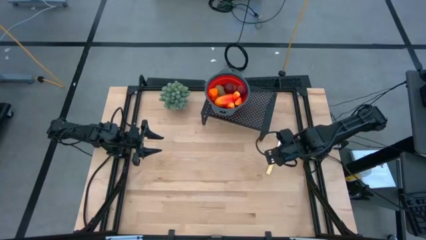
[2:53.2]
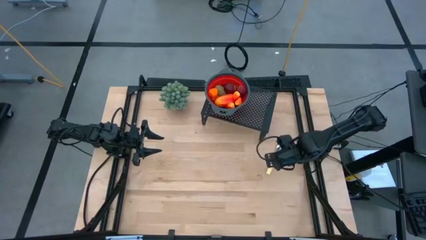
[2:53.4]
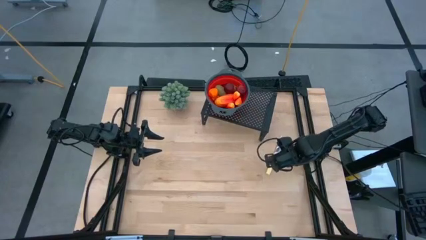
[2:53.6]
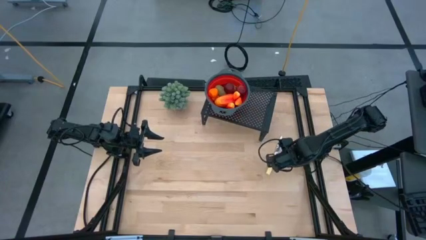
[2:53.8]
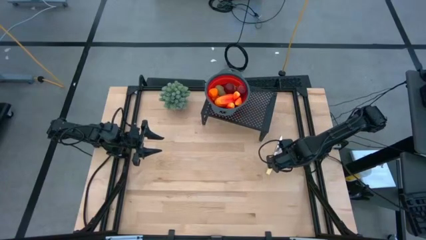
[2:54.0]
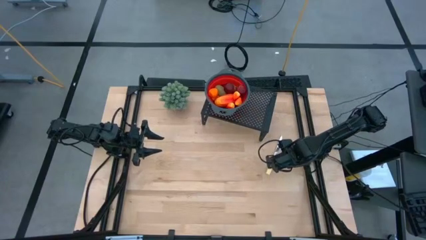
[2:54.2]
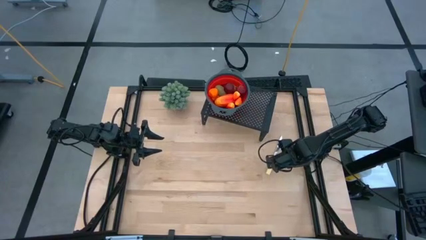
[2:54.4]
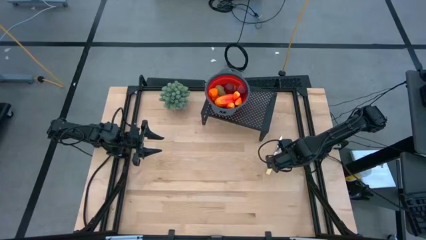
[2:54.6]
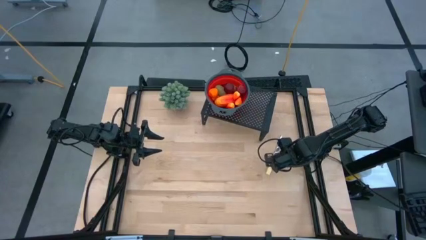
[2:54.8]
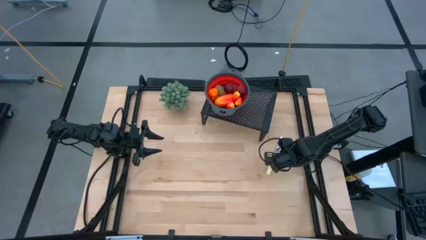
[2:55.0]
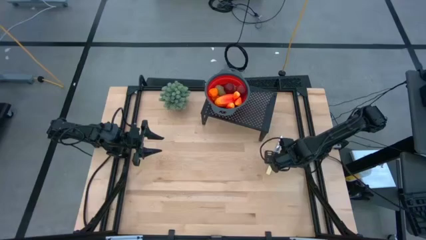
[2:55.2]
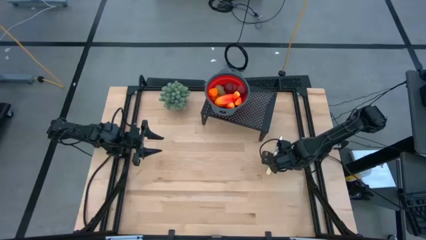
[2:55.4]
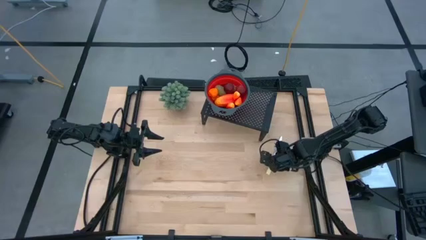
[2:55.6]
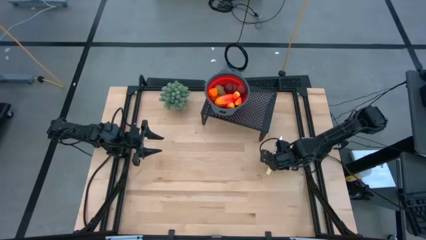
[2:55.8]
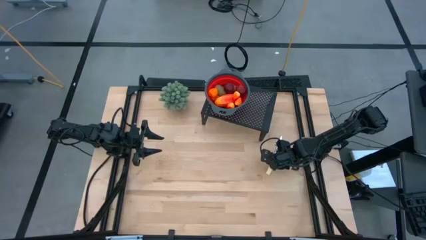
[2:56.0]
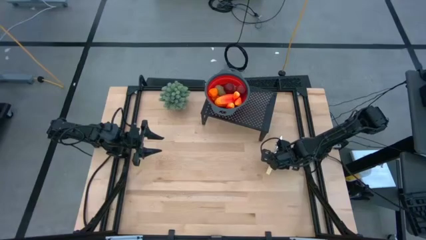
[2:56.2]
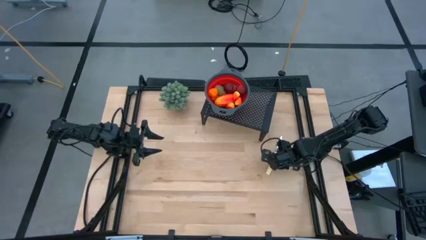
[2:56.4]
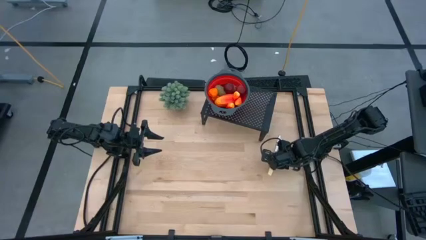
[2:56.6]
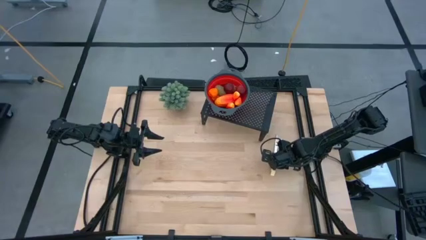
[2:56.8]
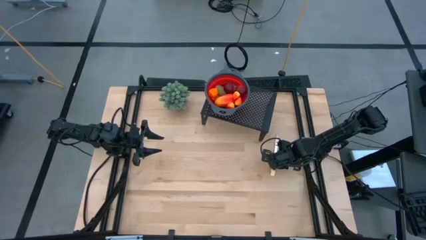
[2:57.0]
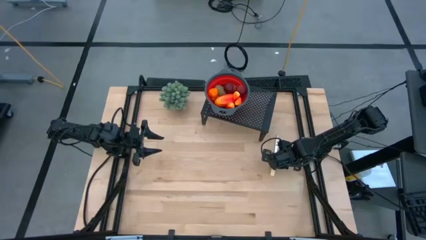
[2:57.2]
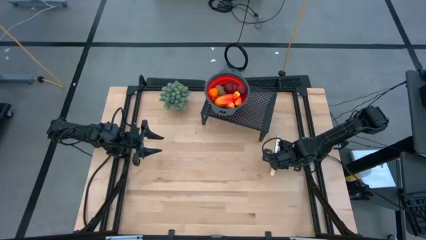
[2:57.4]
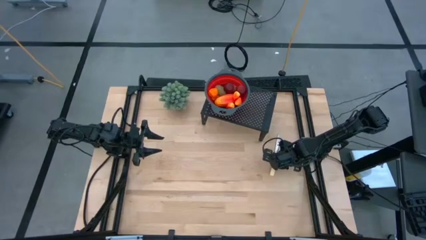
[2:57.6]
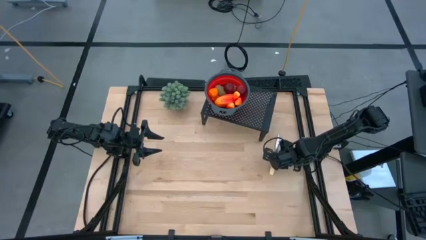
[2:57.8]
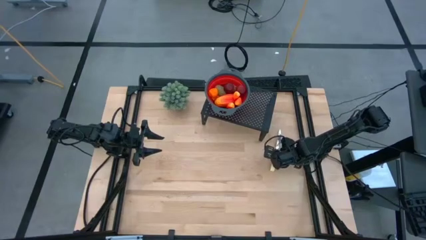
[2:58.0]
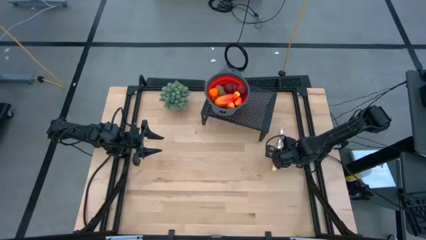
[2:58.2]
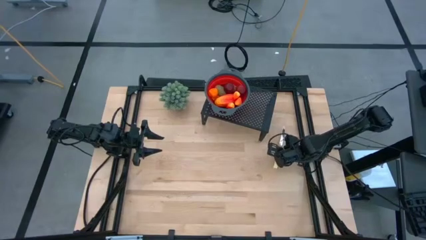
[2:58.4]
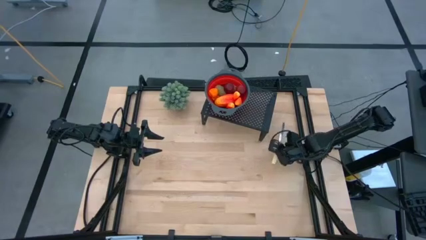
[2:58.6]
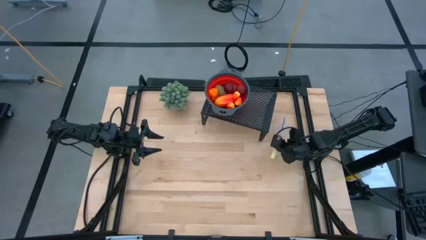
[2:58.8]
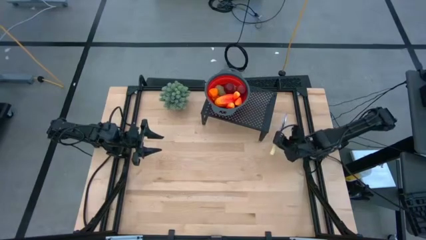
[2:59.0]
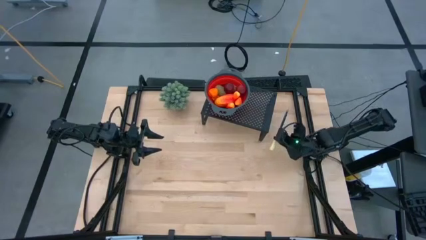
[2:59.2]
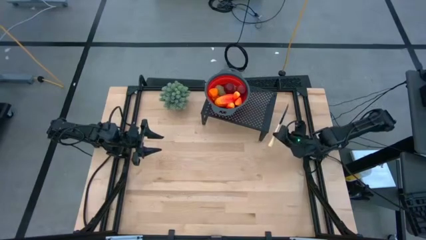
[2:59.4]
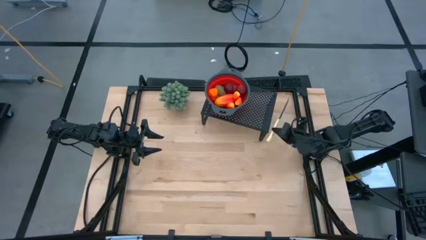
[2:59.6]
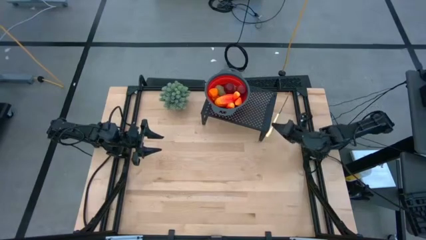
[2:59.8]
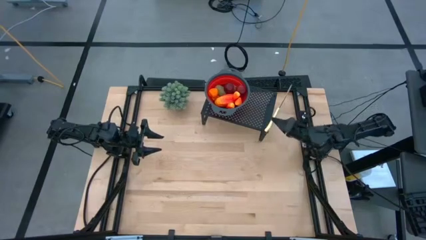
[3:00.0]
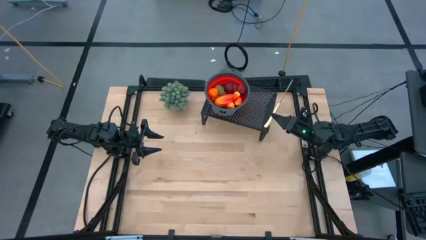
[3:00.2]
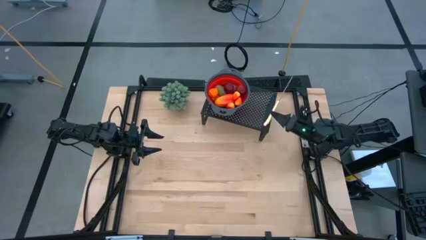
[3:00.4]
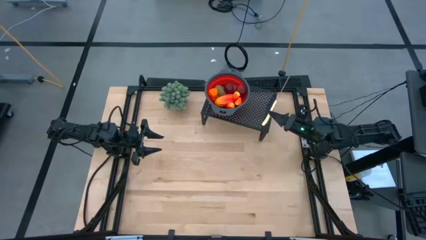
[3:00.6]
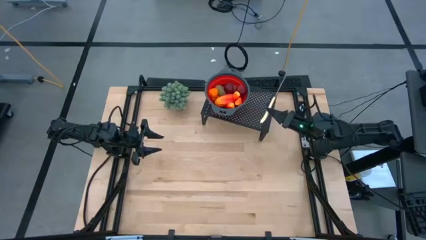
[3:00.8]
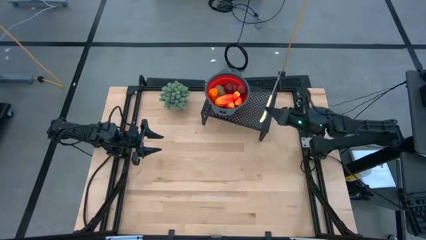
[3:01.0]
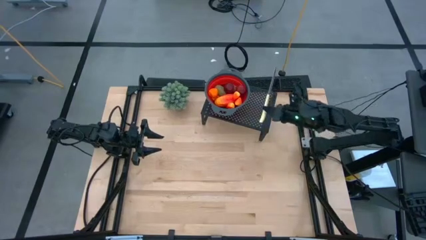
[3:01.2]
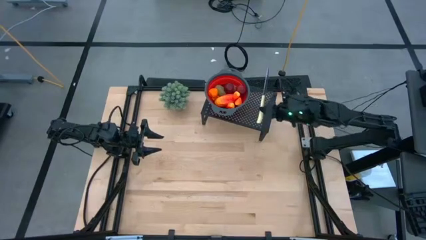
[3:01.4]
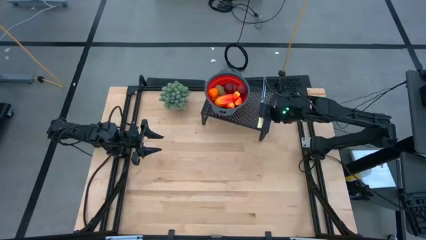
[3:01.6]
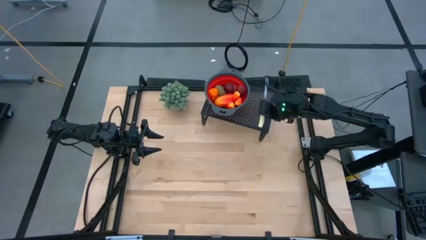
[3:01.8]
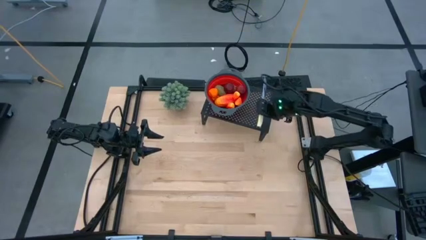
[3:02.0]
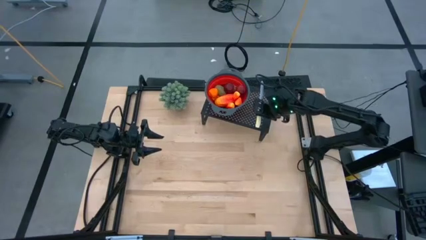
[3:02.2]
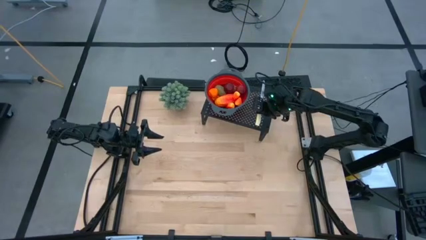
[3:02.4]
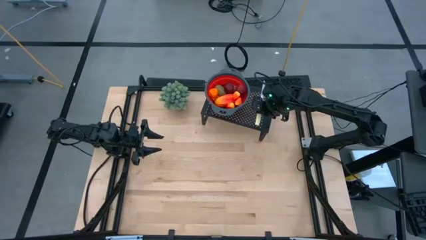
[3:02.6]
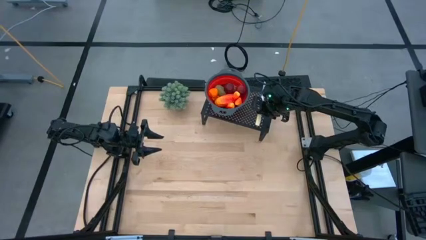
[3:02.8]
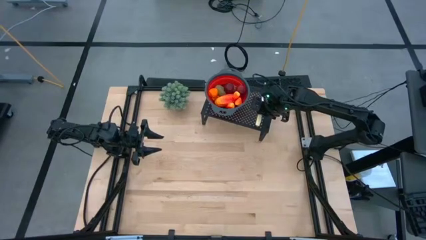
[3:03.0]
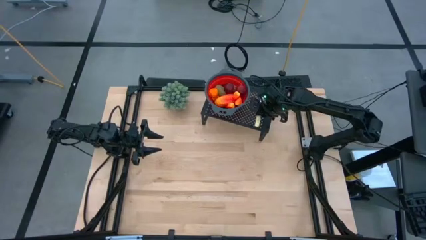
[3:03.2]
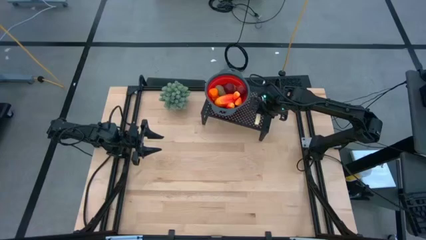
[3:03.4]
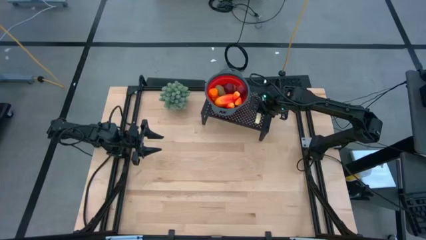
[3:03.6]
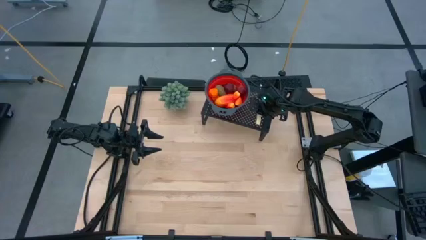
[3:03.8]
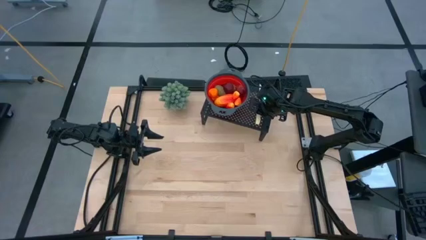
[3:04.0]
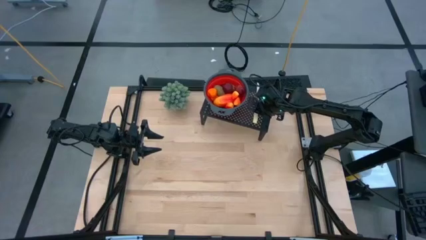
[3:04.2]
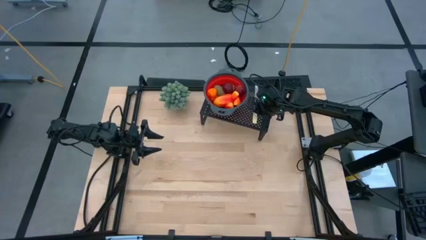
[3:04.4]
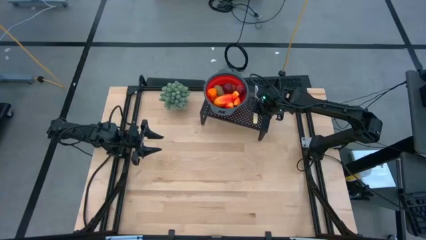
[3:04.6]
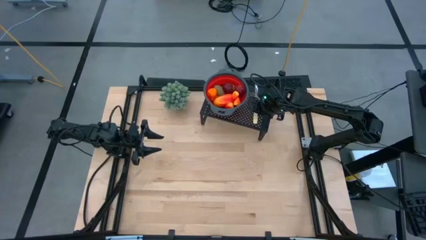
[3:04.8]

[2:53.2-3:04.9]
Task: Pick & Place Fruit
Put the yellow table knife on the red shelf

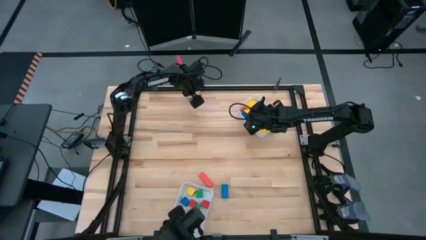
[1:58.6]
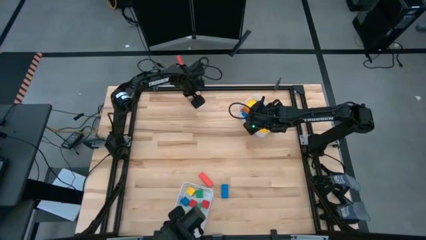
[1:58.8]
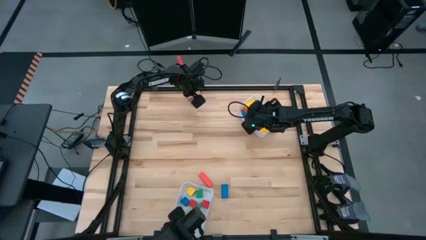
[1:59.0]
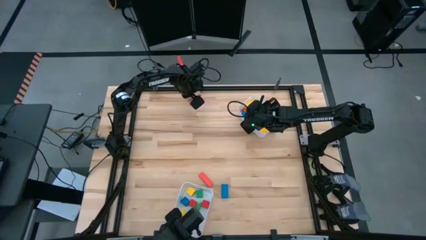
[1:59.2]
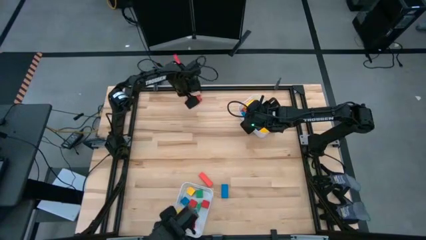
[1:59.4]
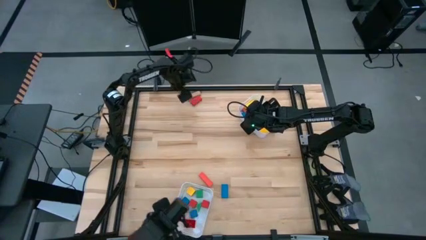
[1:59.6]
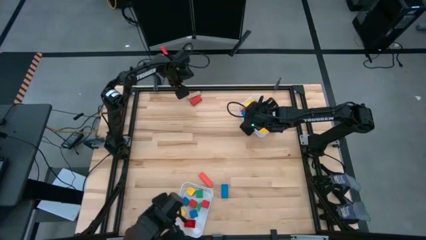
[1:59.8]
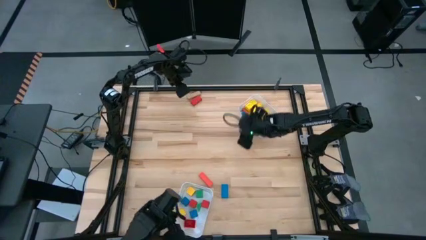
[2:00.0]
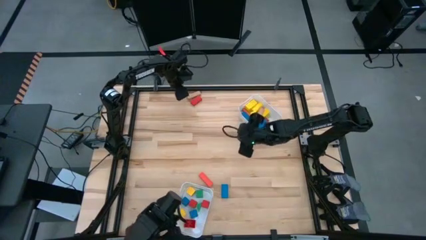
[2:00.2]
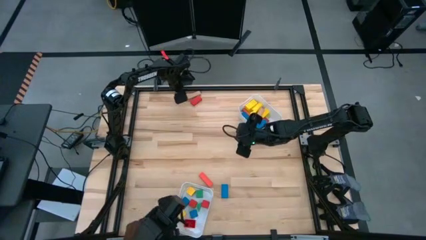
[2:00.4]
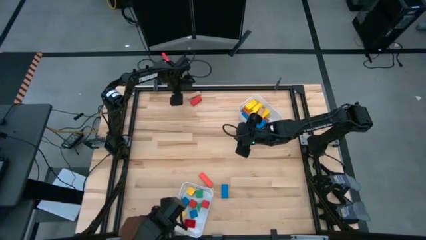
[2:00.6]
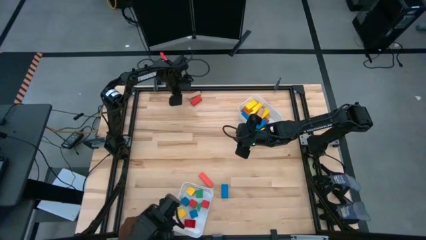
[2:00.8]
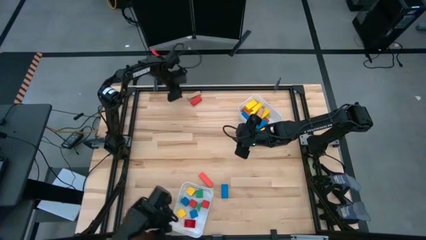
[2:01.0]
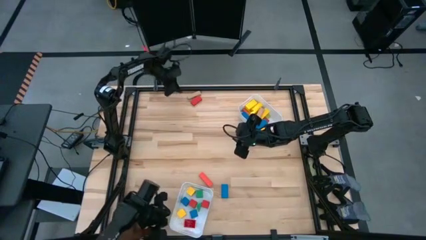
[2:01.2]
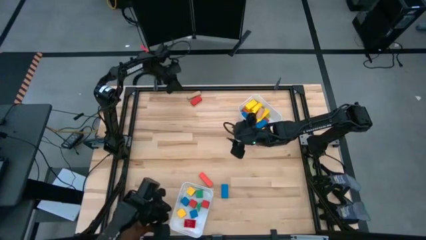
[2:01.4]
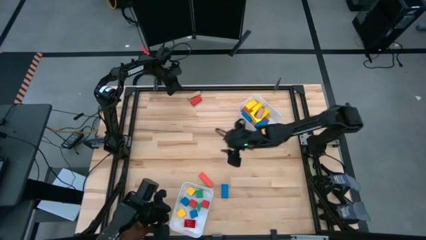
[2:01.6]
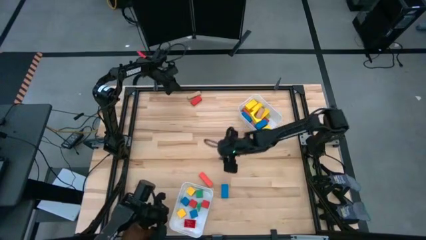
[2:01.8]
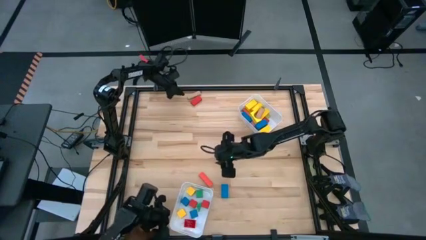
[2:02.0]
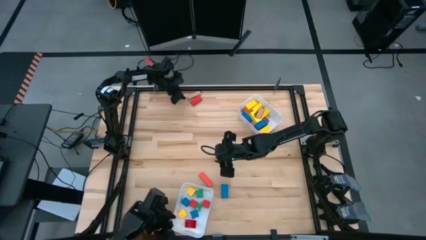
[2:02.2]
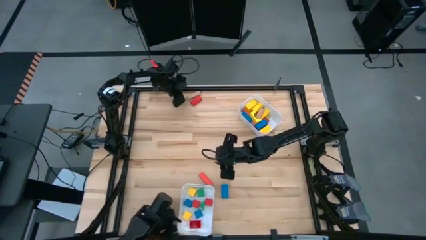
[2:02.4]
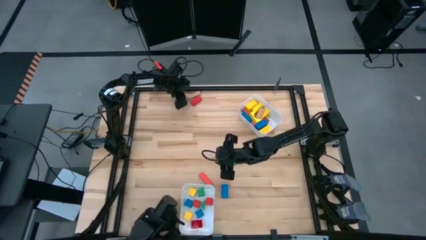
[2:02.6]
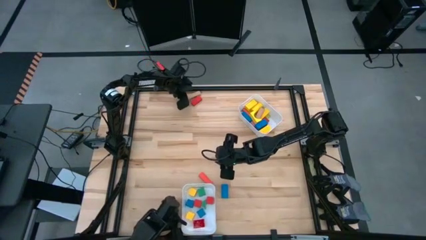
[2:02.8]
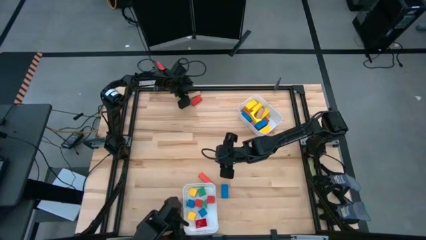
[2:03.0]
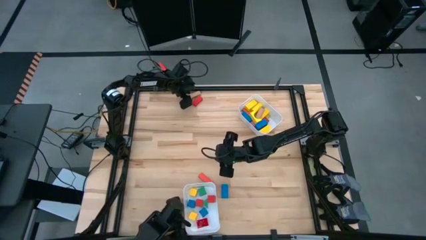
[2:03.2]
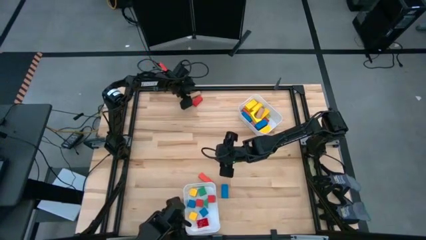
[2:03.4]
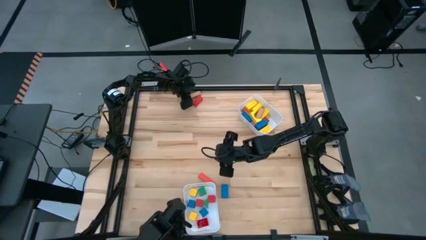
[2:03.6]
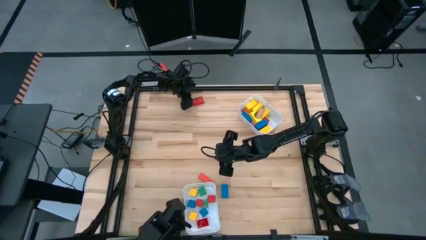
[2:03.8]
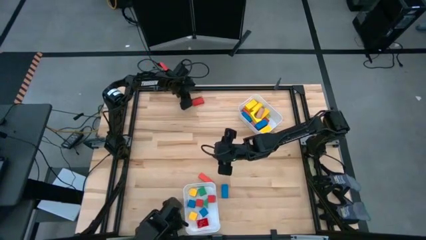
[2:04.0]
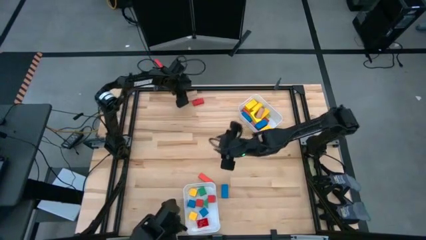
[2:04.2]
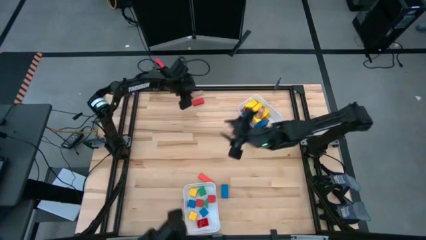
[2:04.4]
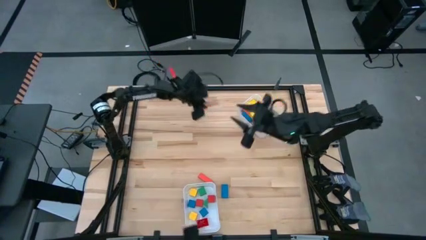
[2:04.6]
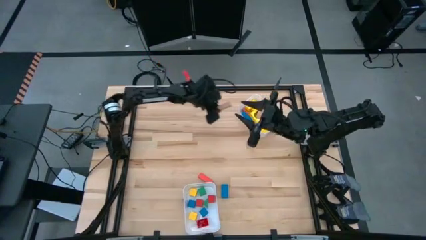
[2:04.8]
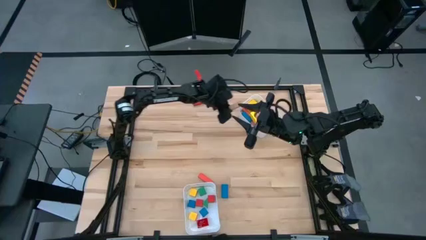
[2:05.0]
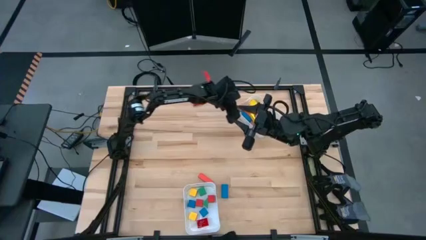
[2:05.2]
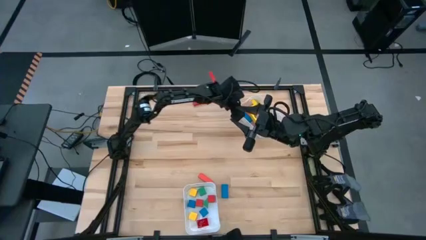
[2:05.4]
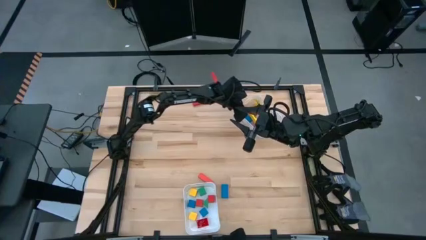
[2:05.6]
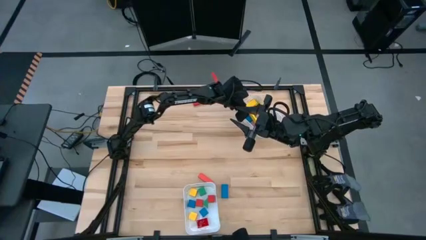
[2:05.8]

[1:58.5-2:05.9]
Task: Sort blocks by size
Put the brown rectangle block into the top white bin
